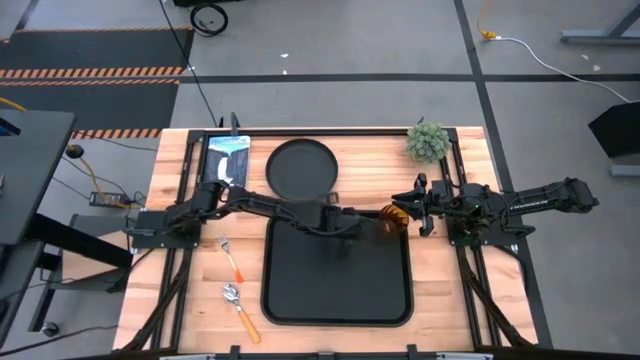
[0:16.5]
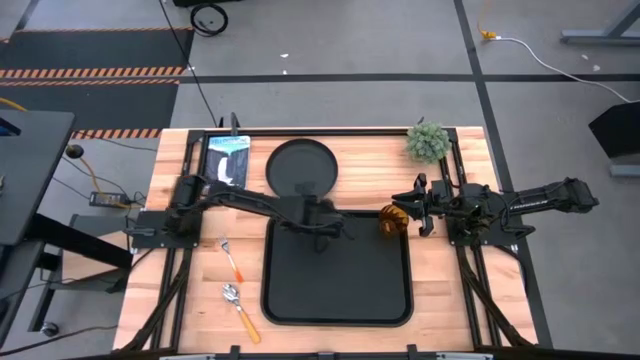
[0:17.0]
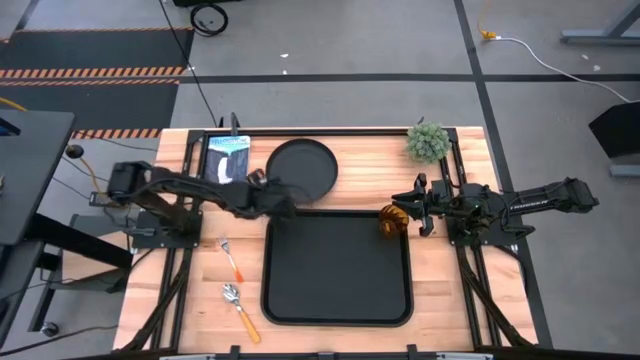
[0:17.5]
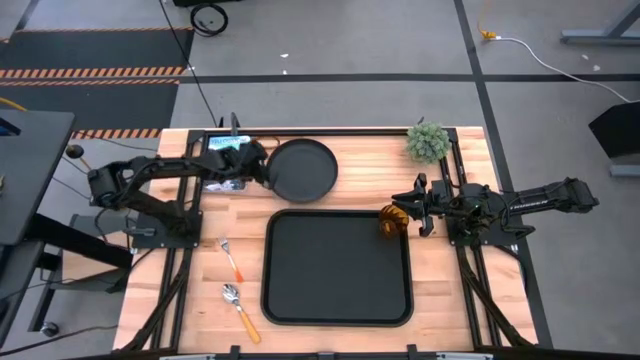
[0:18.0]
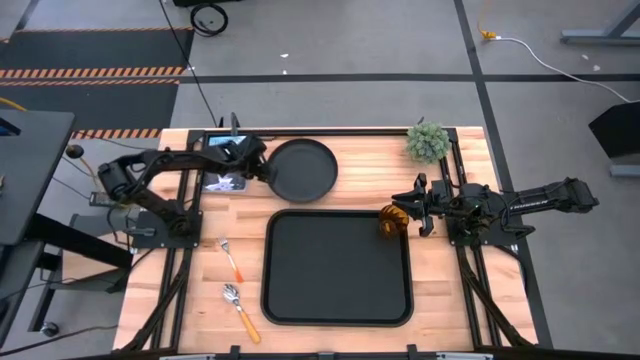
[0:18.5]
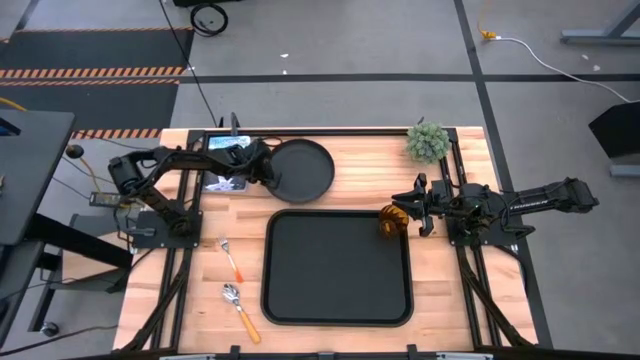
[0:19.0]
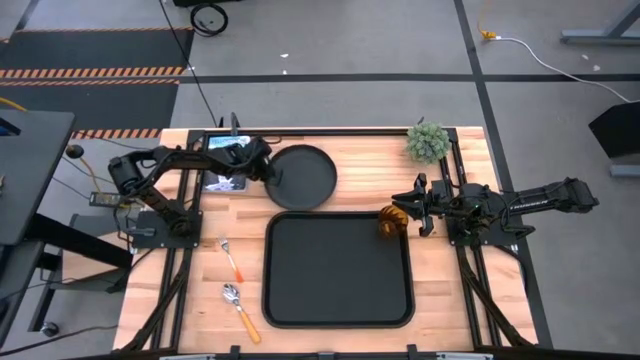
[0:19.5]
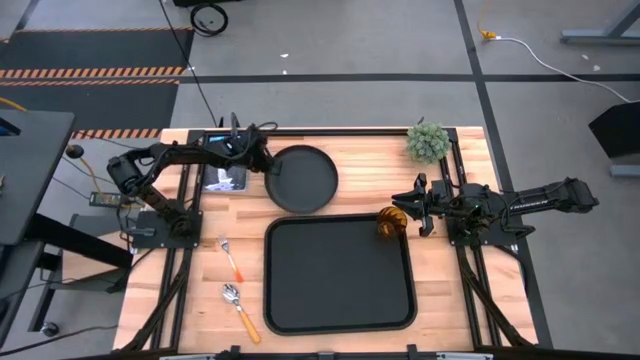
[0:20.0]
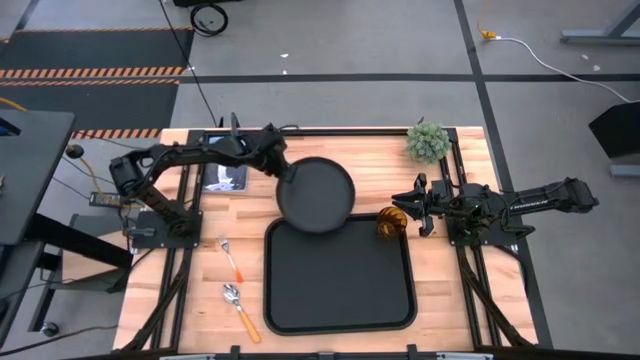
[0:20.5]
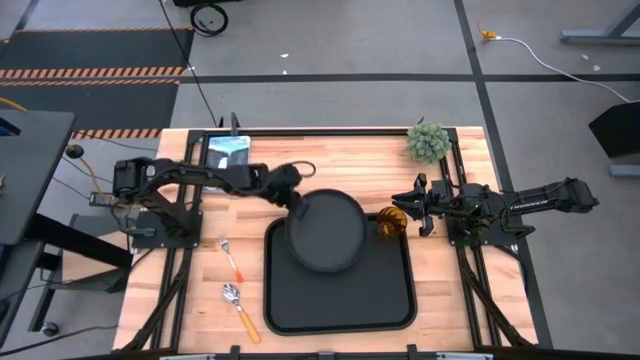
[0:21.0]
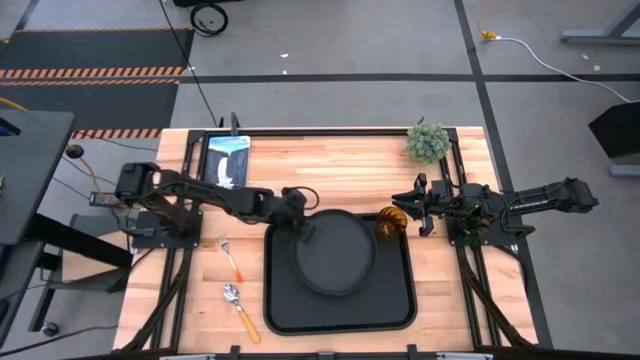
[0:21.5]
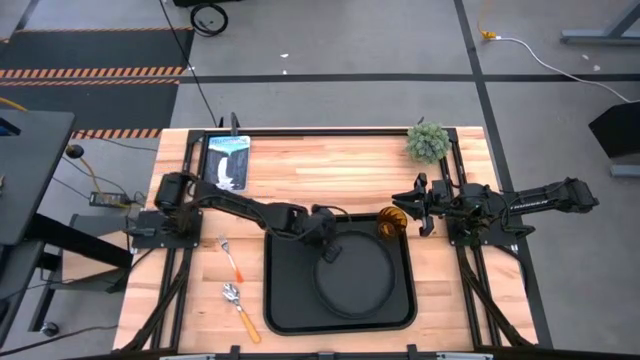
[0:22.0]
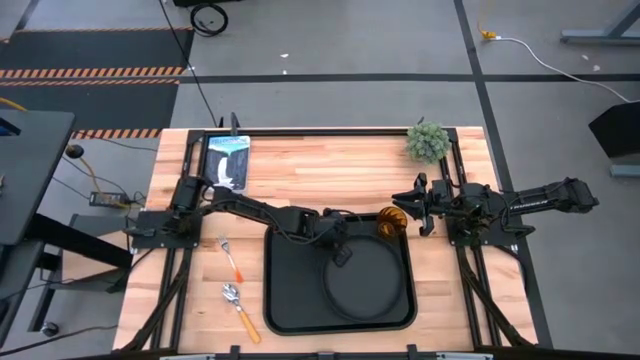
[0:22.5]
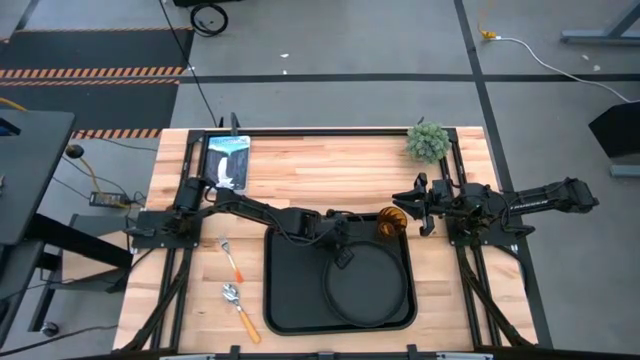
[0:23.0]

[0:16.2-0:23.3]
Task: Pick and place plate/cup/fork/spoon on tray
Put the black plate on the bottom right of the black tray

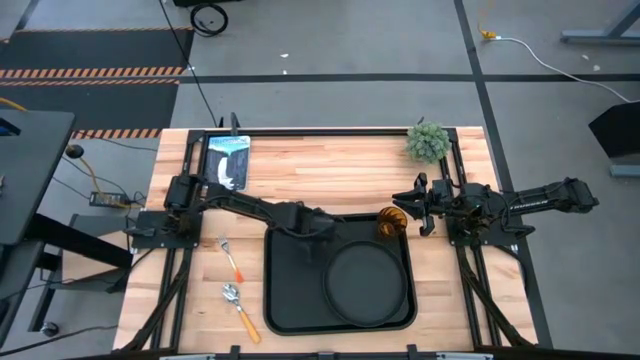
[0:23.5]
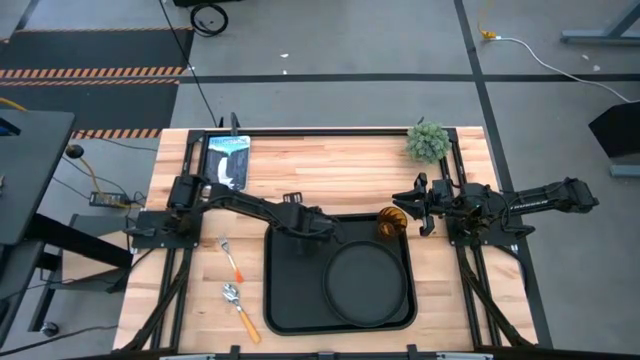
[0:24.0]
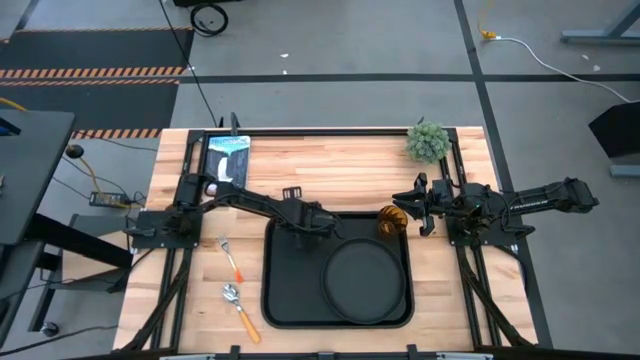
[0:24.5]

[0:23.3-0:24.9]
Adjust the black tray

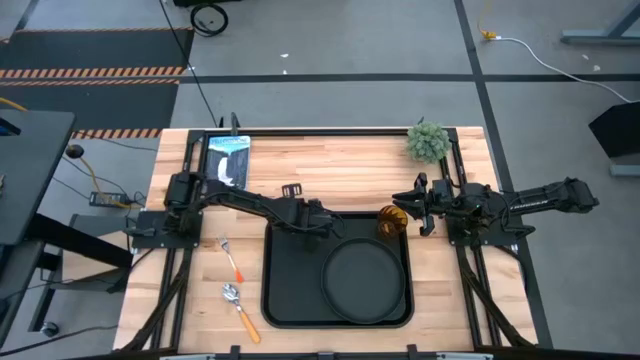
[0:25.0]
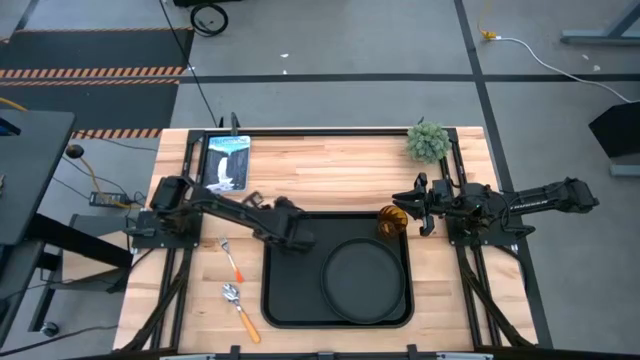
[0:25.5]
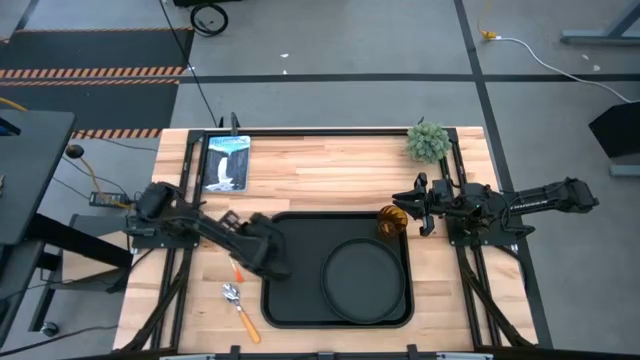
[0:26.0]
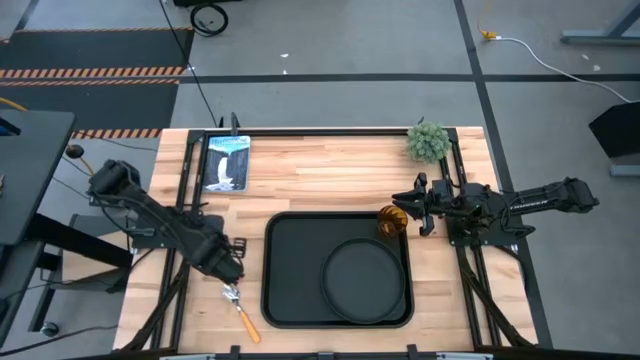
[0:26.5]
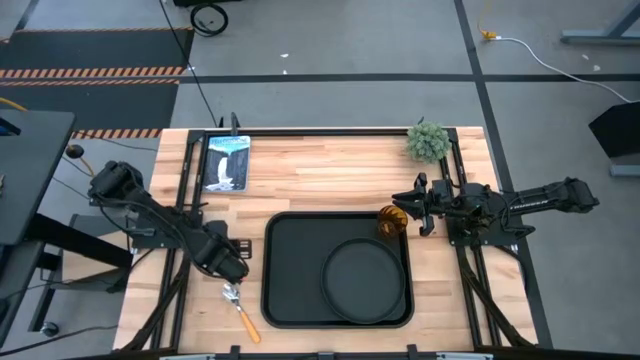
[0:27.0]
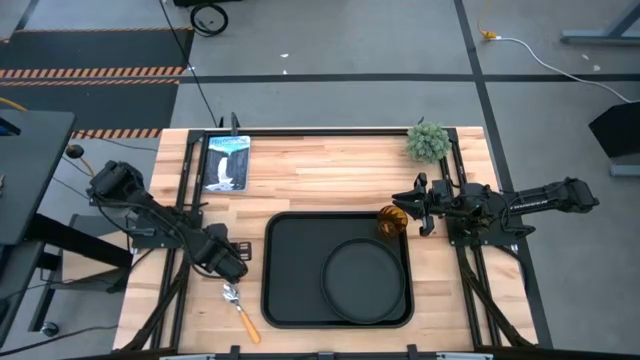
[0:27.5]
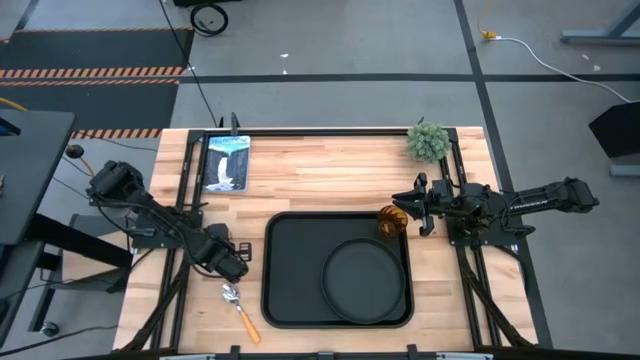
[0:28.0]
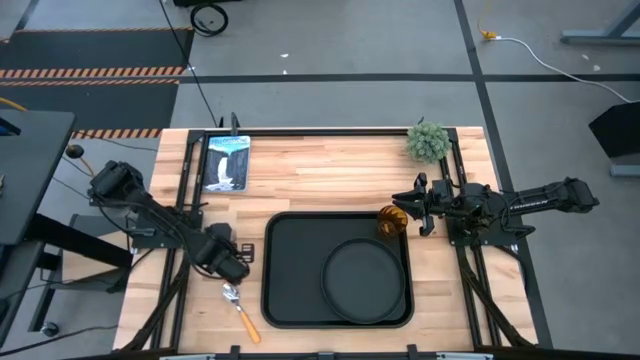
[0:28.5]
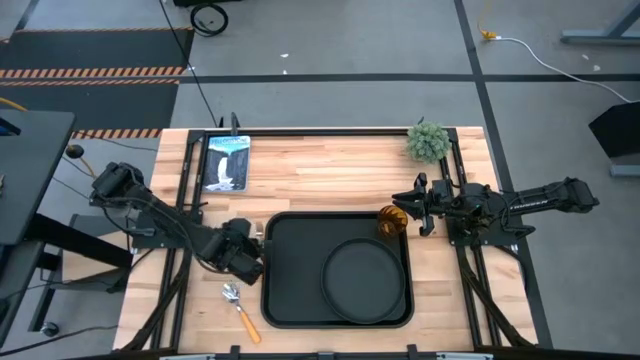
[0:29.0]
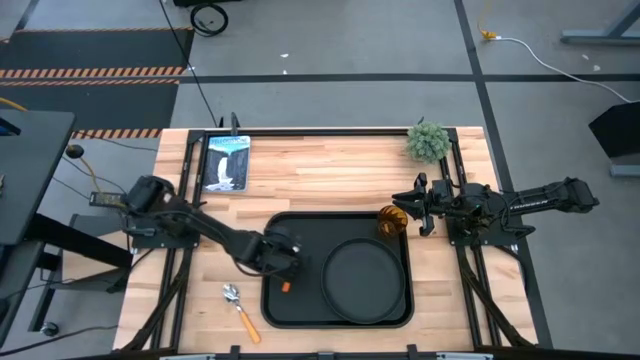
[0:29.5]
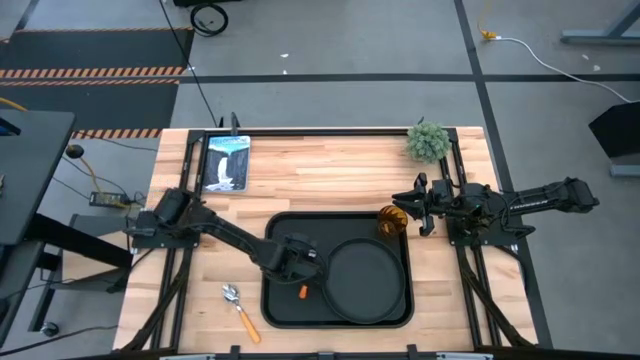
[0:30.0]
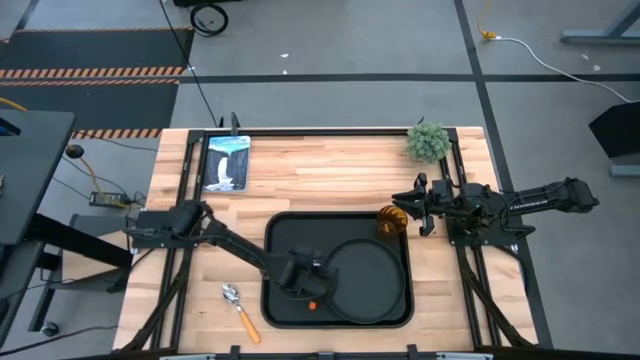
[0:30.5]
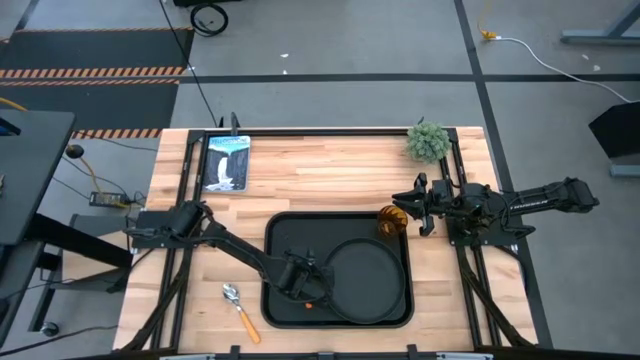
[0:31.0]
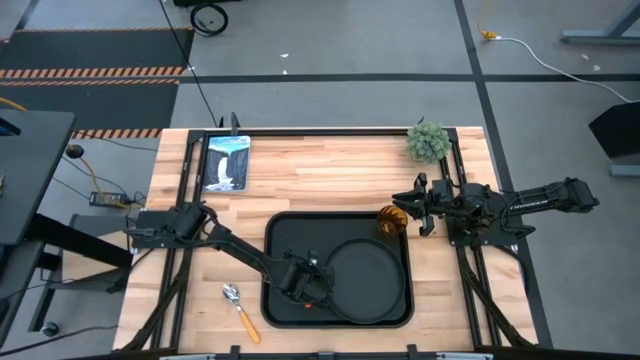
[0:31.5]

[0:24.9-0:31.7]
Put the orange fork to the left of the black plate on the black tray

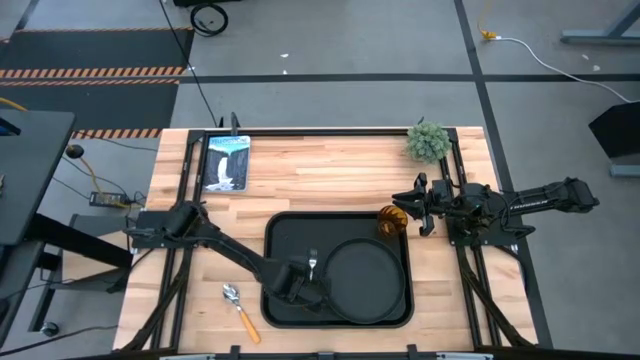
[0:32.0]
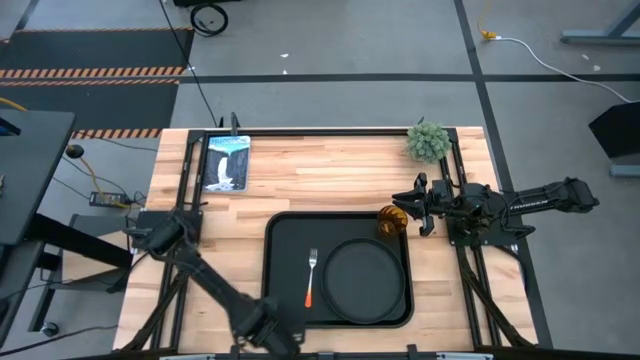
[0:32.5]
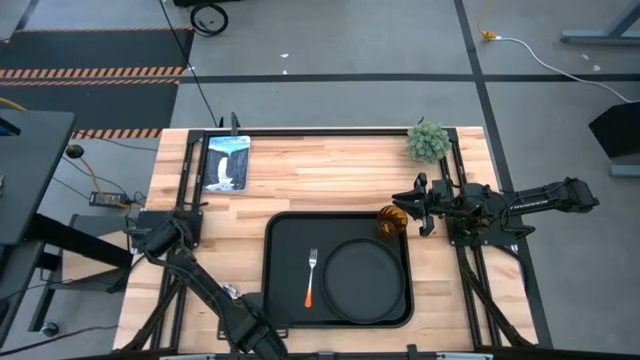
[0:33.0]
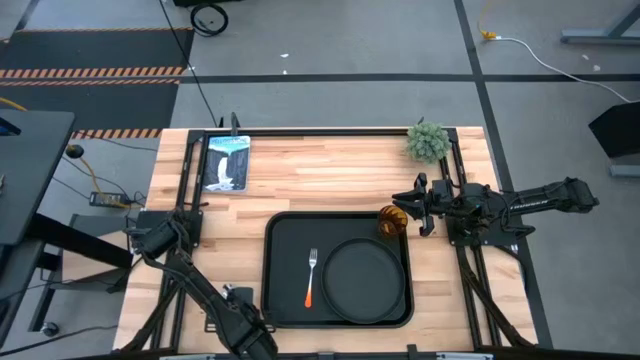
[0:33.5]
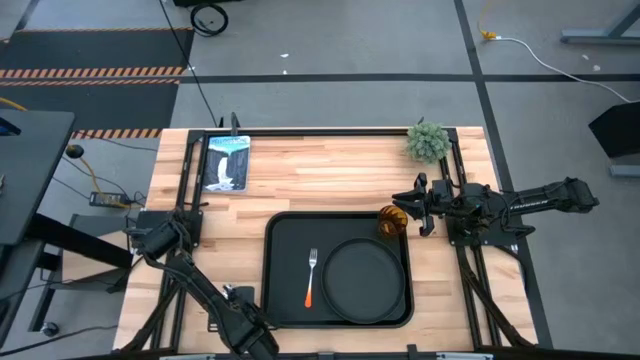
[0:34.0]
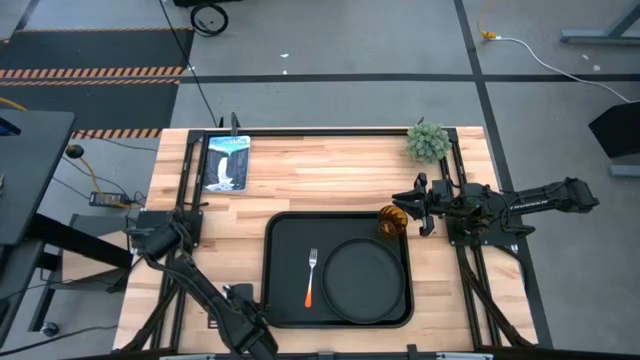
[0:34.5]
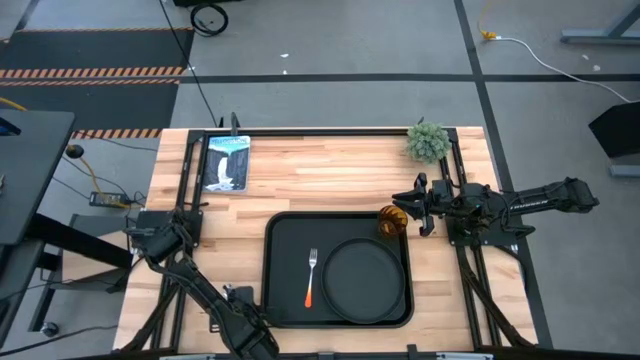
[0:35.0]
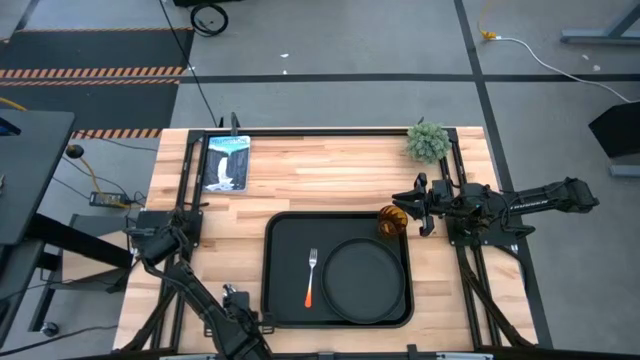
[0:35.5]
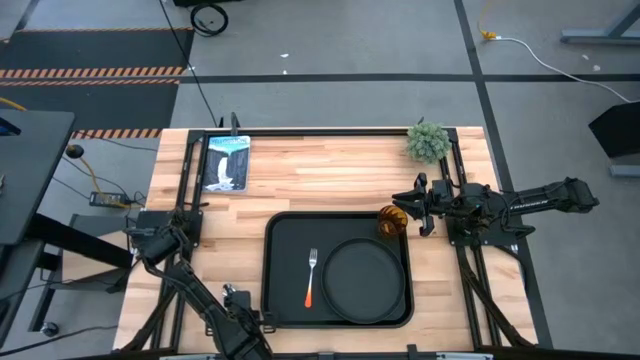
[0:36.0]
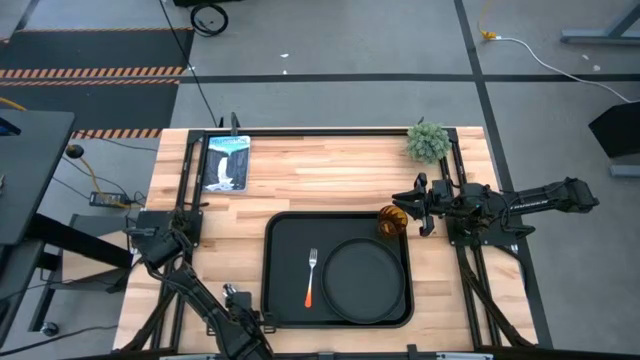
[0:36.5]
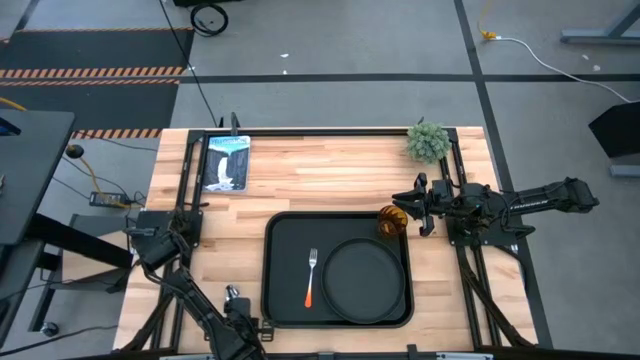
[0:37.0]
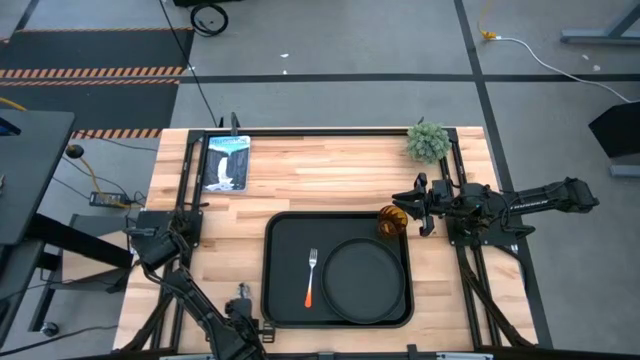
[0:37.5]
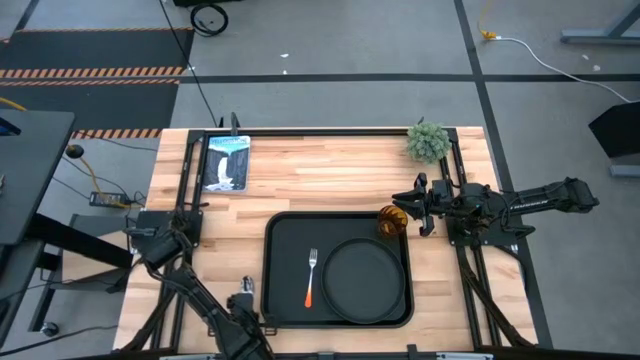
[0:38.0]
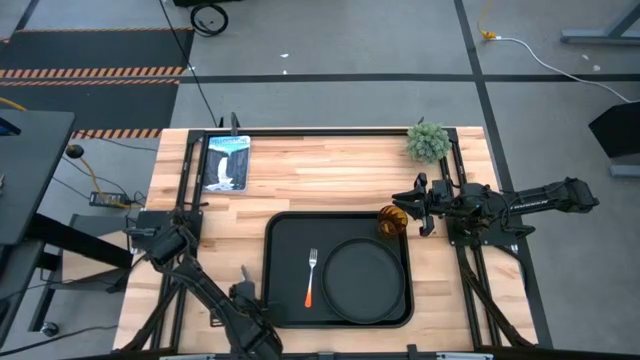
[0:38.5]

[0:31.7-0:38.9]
Put the yellow spoon to the left of the orange fork on the black tray
